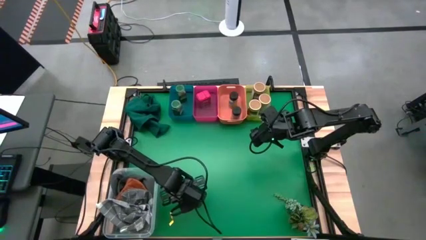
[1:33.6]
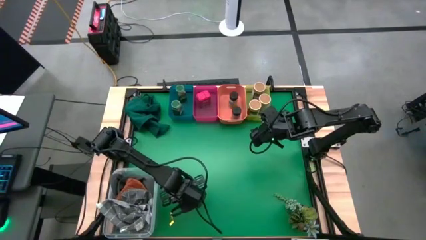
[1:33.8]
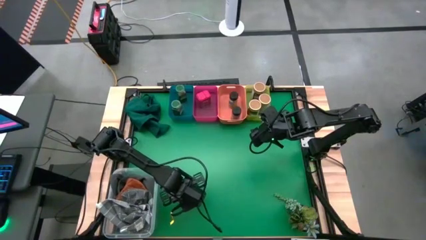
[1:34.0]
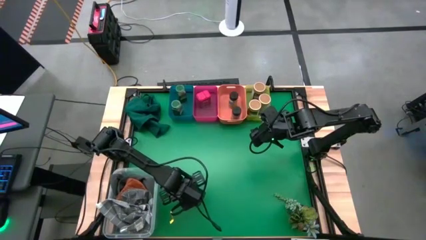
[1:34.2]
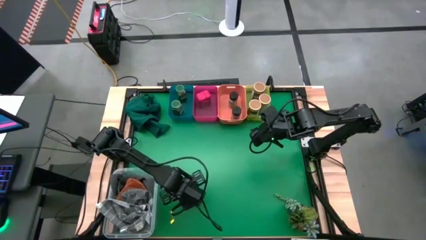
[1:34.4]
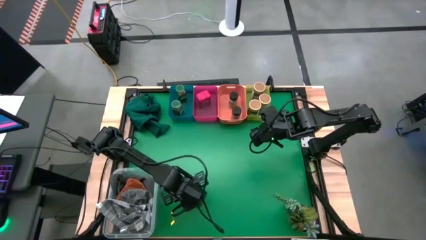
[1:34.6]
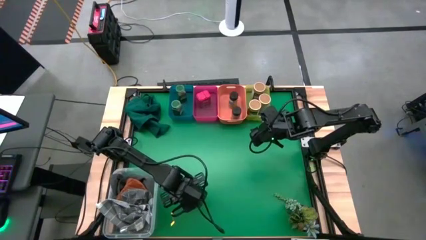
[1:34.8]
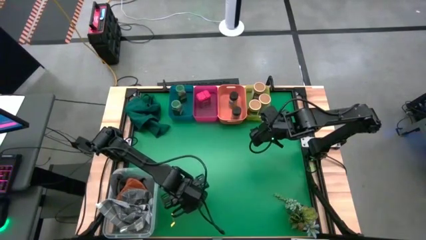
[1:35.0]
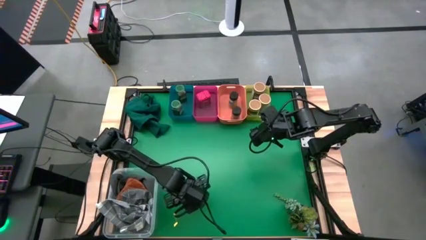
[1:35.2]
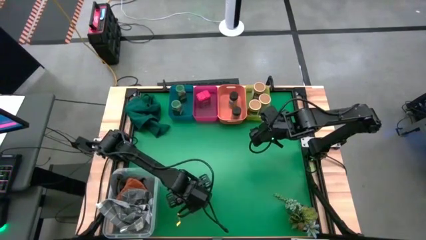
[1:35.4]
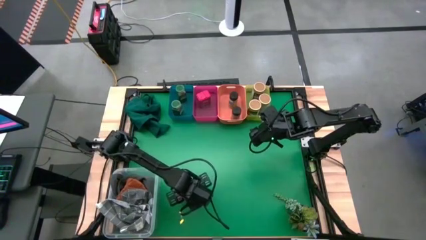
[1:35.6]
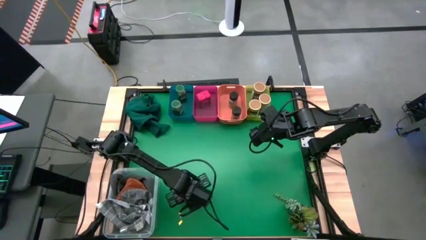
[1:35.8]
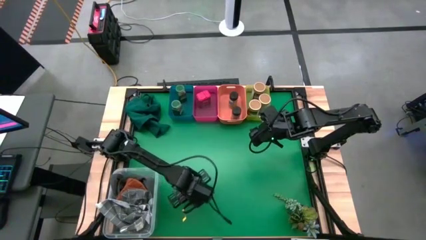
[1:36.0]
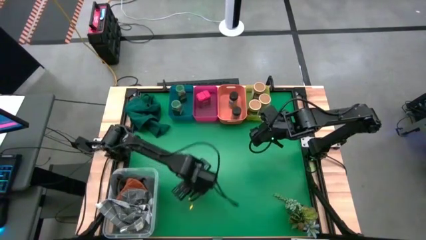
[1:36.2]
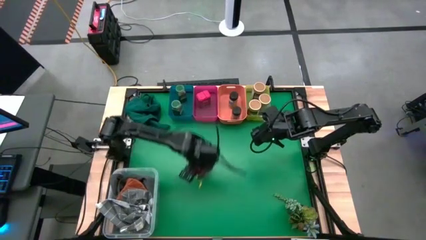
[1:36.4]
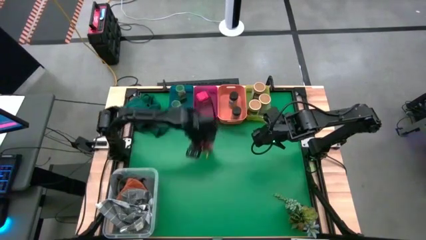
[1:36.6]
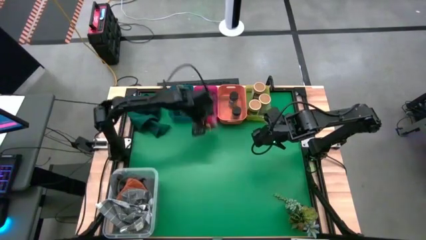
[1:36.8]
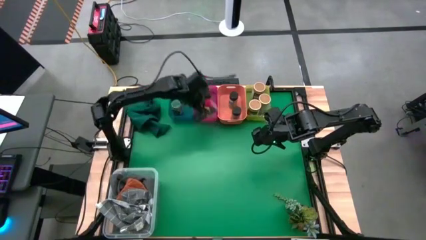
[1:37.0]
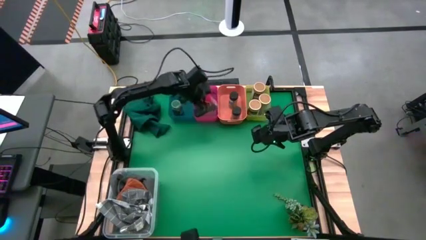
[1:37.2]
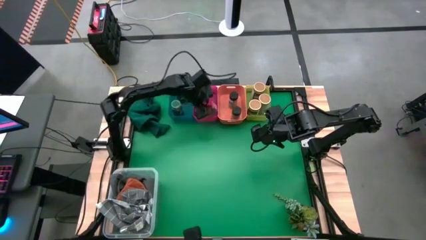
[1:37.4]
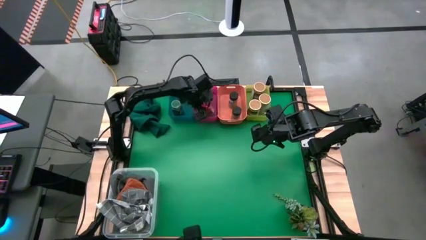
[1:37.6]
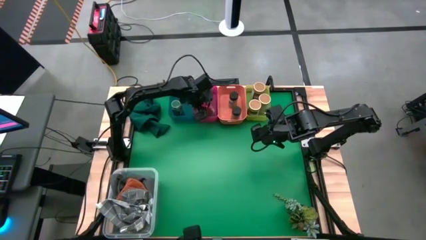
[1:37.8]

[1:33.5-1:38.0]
Task: Sort spices by type
Put the red spice can into the pink bin

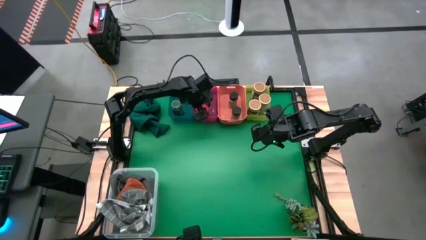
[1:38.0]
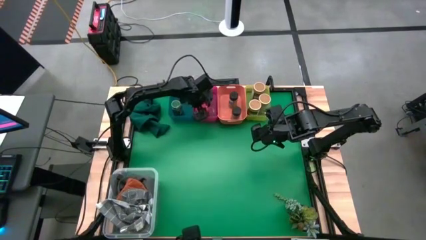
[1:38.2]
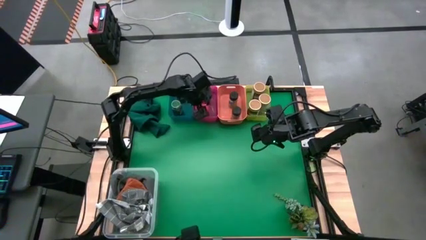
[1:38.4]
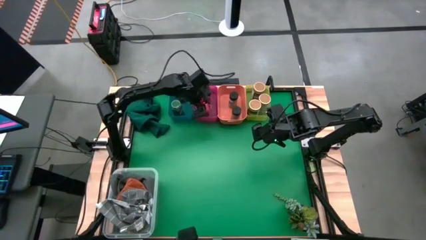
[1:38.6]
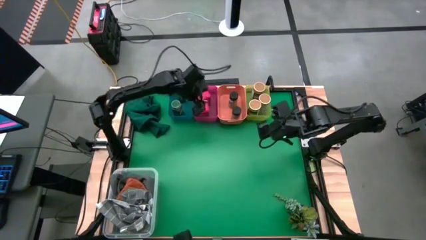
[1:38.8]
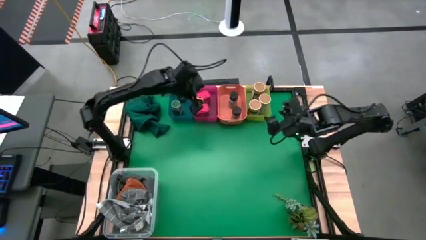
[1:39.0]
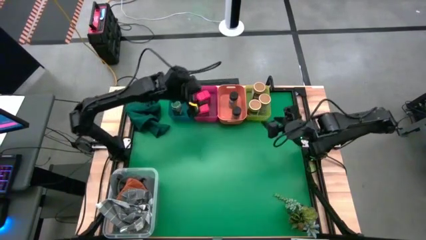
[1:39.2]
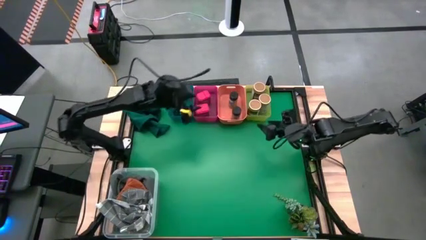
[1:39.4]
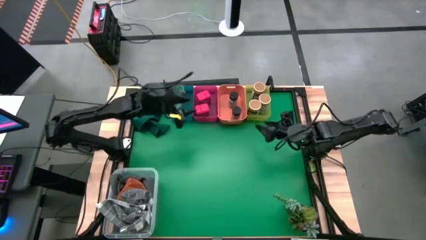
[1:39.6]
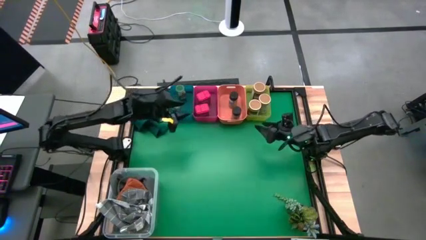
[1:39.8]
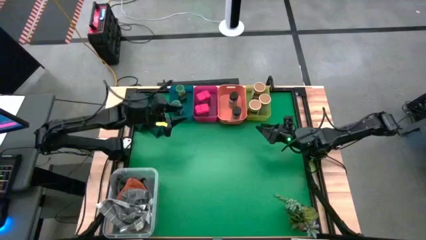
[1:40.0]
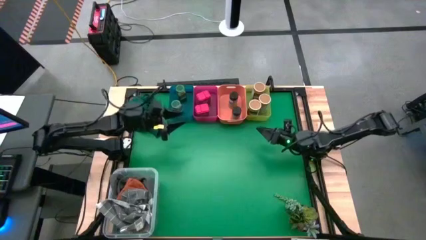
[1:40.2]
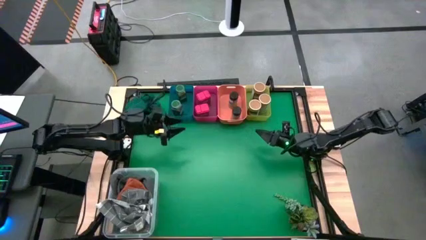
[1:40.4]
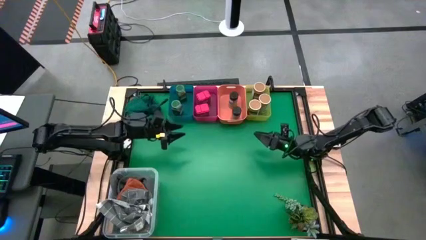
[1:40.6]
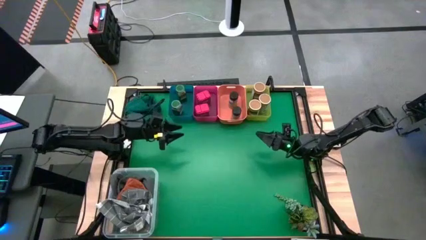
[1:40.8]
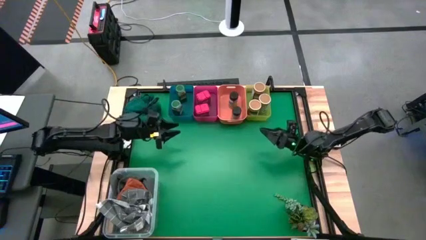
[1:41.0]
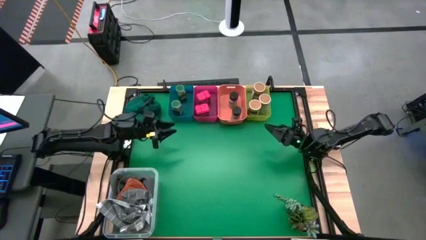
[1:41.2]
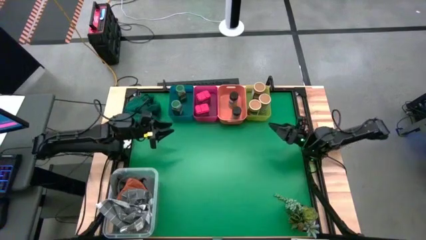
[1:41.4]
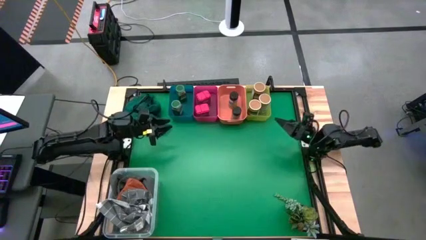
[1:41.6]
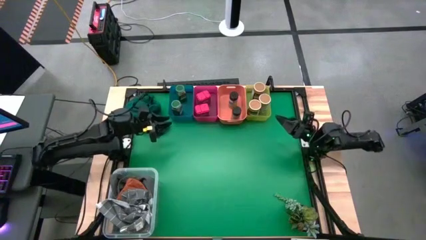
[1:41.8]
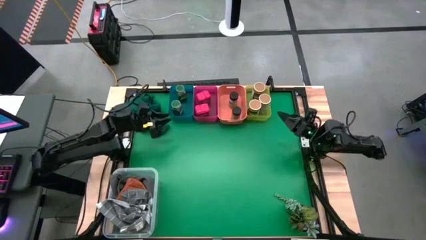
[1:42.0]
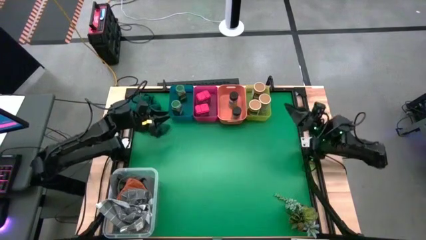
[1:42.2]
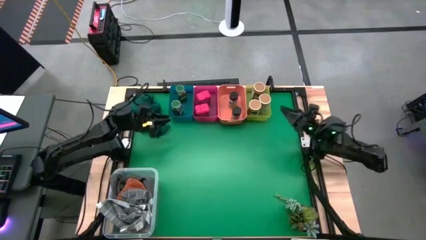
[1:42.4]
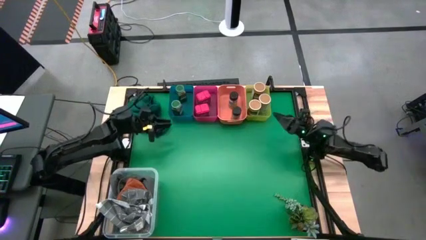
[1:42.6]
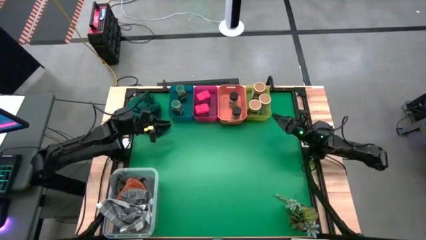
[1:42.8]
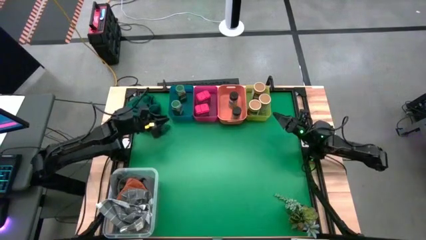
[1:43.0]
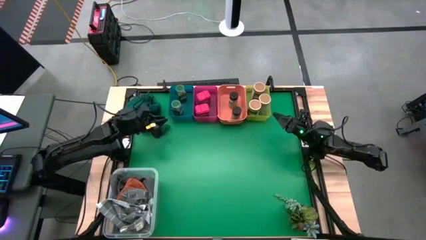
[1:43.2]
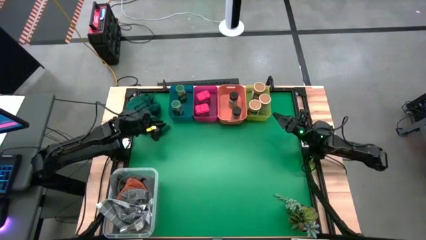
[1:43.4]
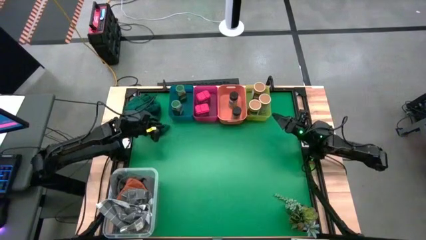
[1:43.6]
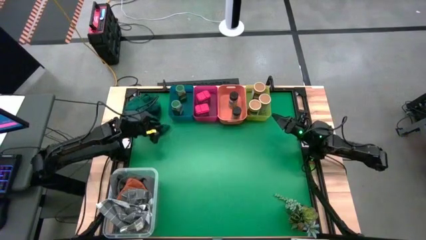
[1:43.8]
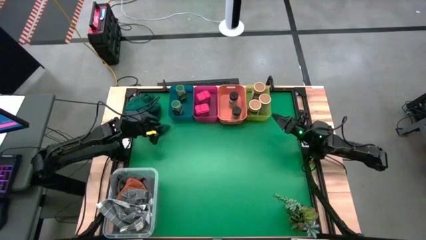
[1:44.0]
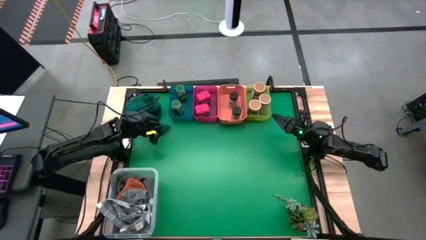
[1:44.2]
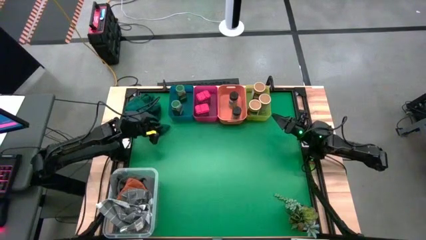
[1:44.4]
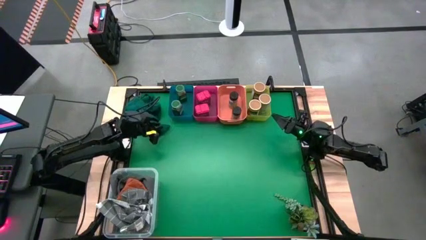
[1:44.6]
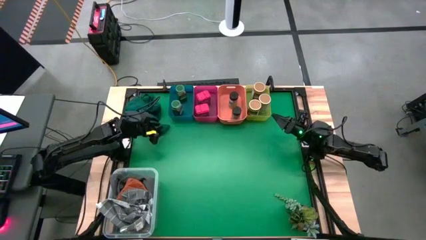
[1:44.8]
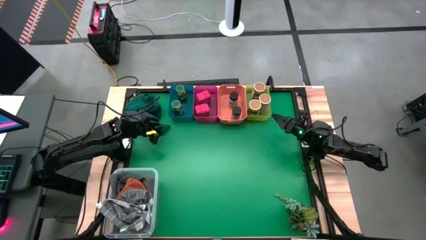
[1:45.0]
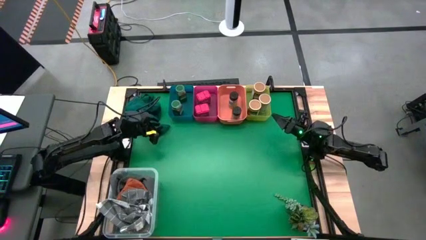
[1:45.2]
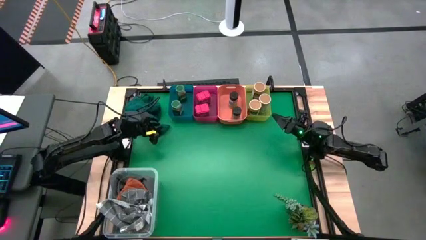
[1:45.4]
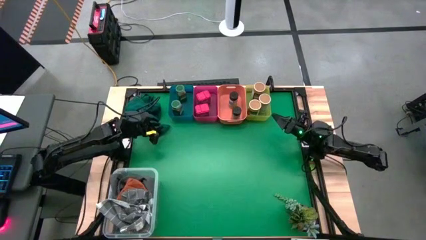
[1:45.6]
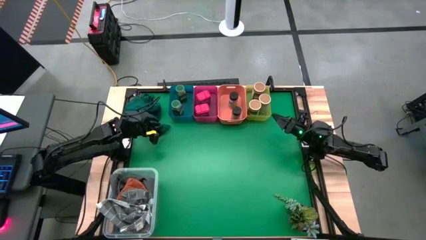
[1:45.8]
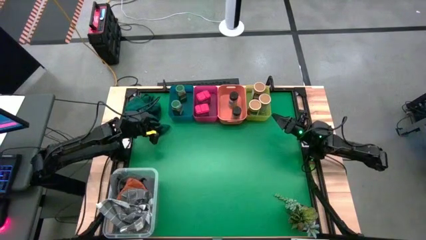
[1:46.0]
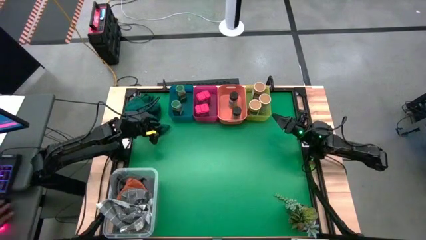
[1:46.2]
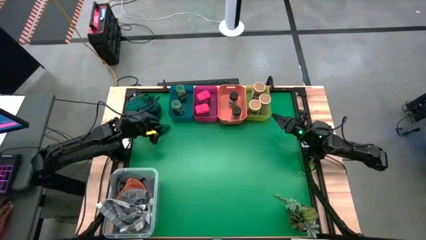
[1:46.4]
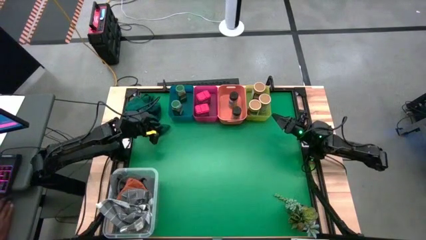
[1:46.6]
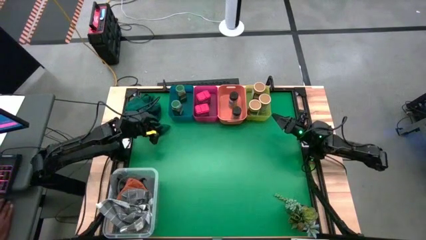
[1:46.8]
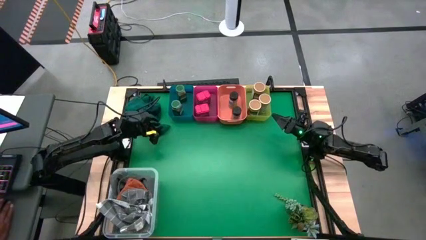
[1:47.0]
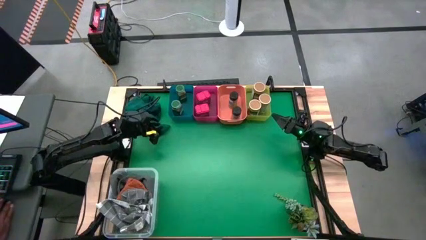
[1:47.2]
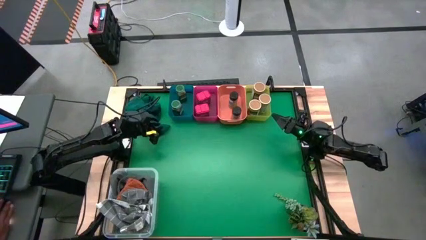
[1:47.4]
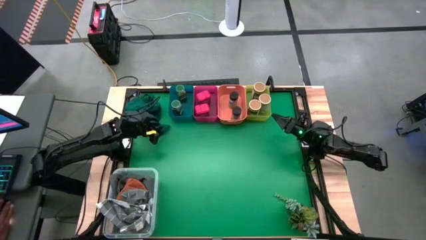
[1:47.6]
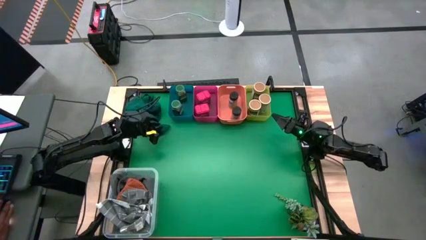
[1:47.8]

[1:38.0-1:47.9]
Return to Home Position
